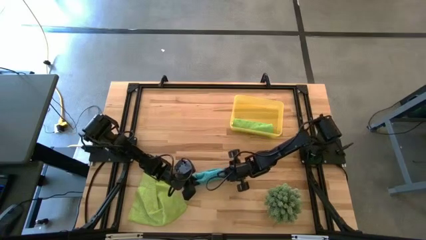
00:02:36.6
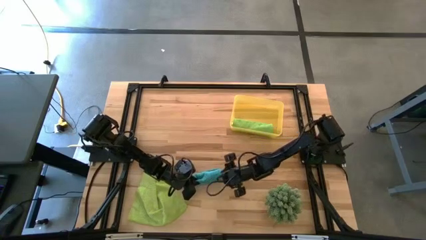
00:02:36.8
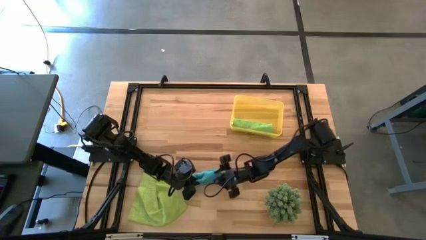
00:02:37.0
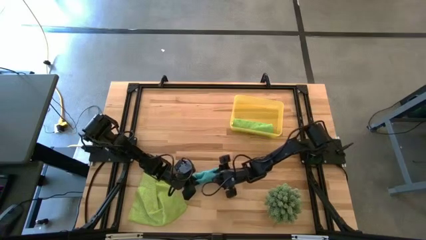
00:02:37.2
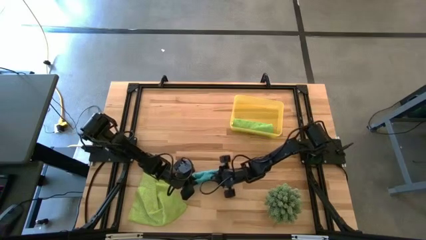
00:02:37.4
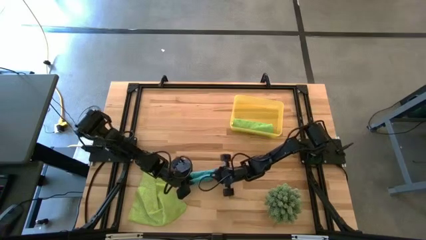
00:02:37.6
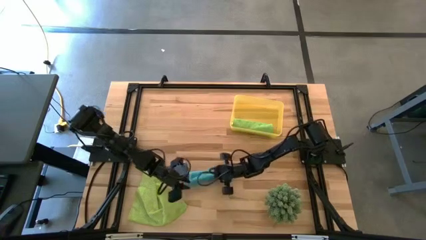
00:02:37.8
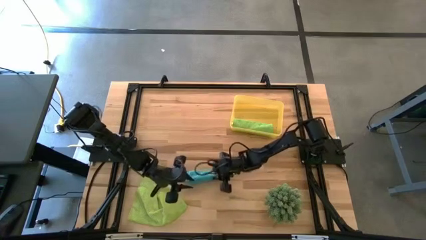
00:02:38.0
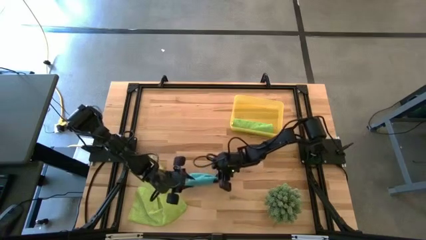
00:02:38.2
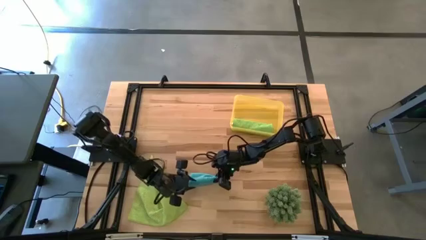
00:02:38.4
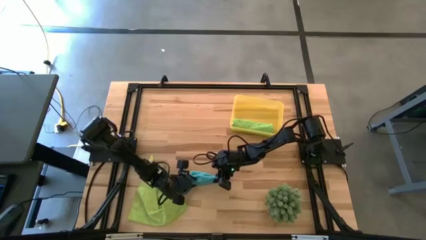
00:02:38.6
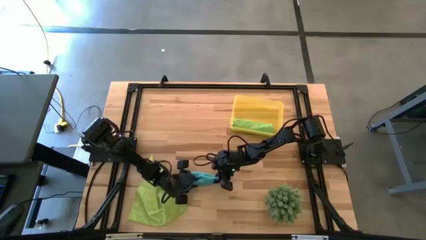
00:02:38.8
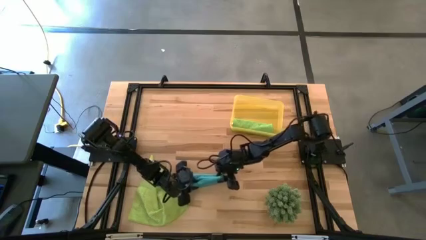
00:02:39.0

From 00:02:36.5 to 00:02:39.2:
Task: Roll microfiber towels into tight, uniform cylinder then place into a basket
Roll the blue microfiber towel

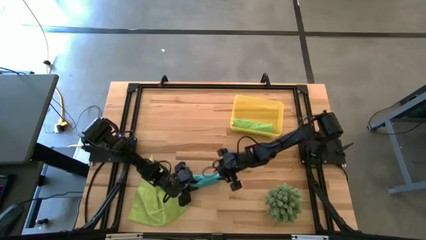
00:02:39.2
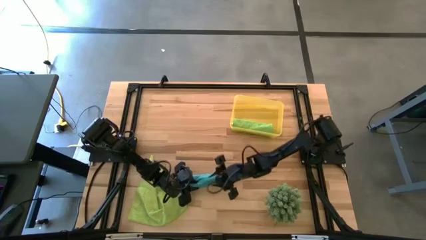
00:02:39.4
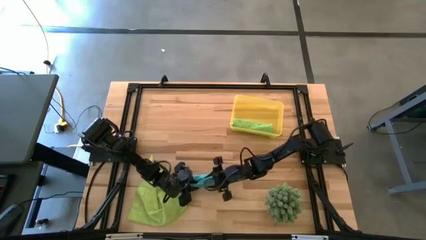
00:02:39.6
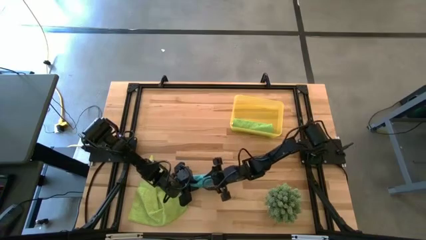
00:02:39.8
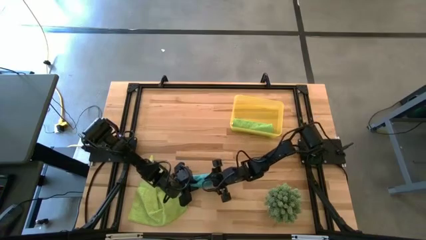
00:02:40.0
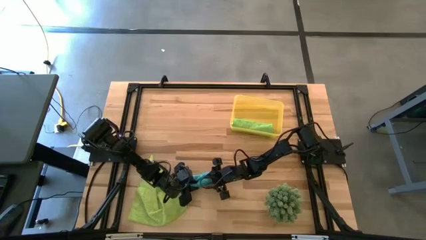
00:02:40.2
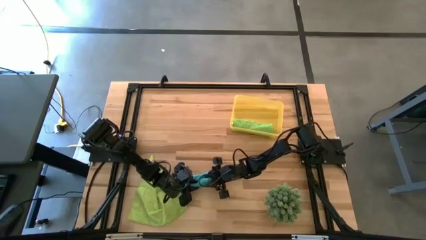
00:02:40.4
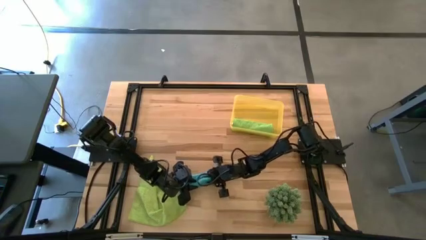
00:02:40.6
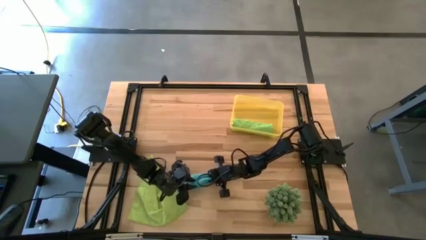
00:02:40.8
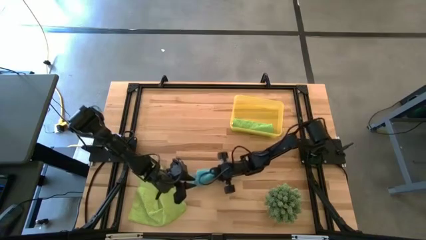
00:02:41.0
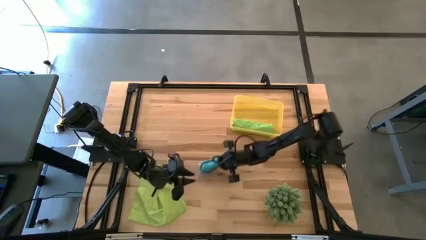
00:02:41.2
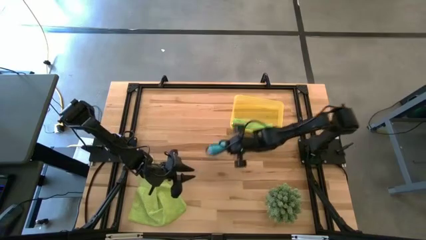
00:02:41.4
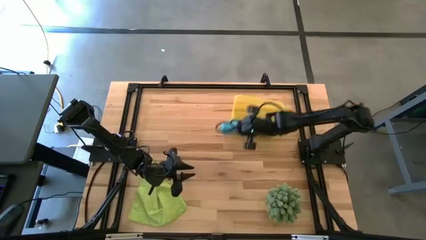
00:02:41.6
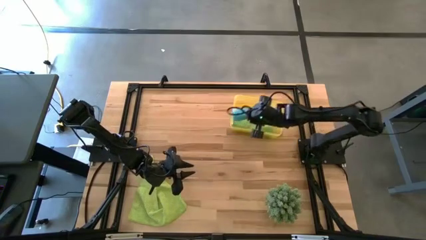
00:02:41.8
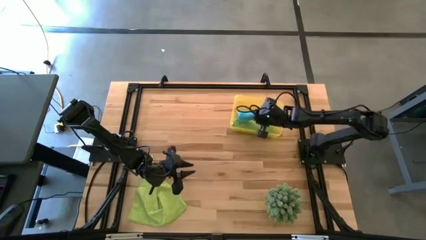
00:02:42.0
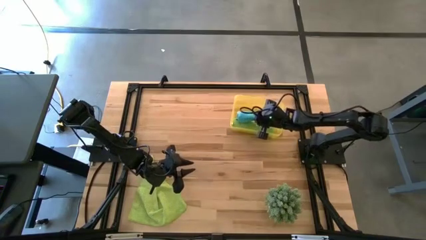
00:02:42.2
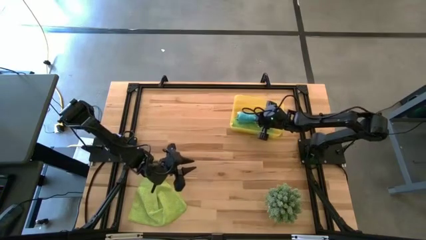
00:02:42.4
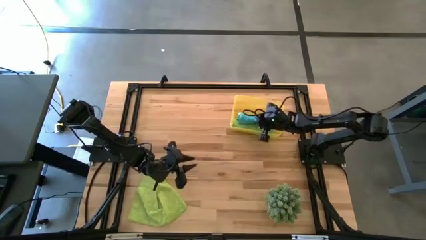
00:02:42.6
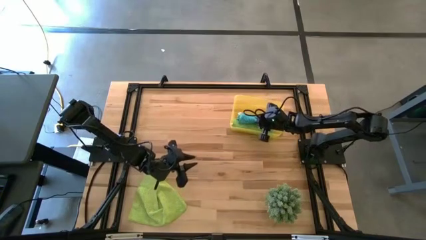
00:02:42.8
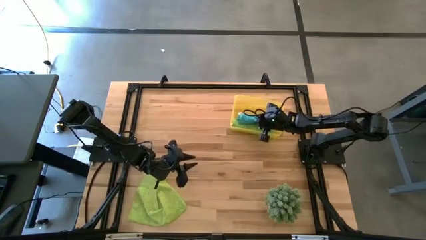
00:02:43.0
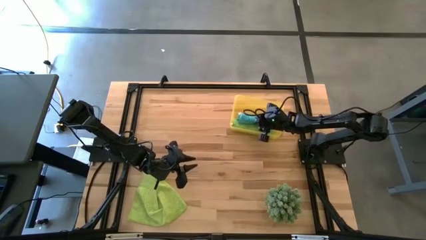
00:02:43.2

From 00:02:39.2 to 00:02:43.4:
Put the rolled blue microfiber towel into the yellow bin

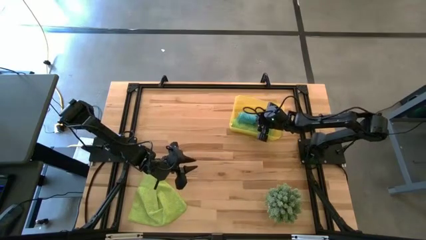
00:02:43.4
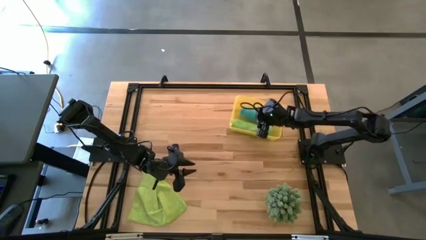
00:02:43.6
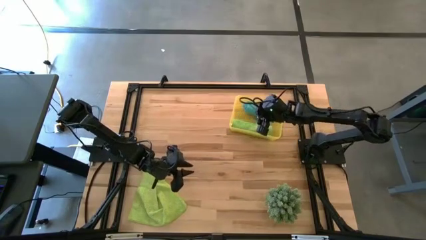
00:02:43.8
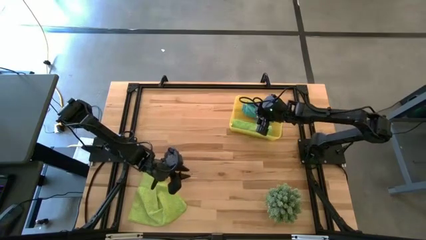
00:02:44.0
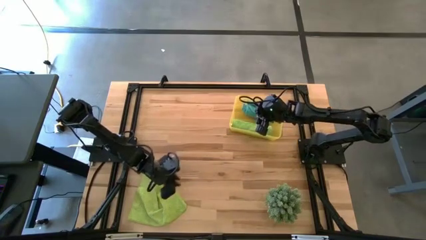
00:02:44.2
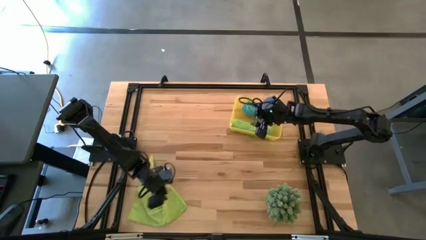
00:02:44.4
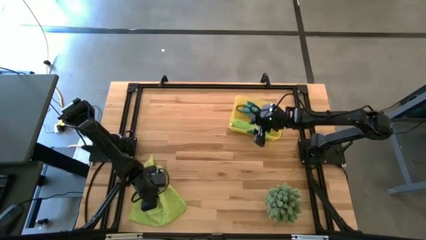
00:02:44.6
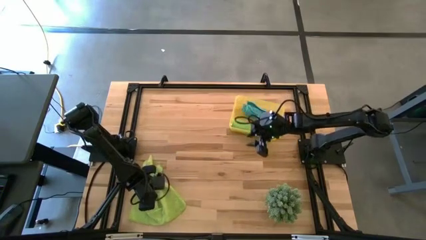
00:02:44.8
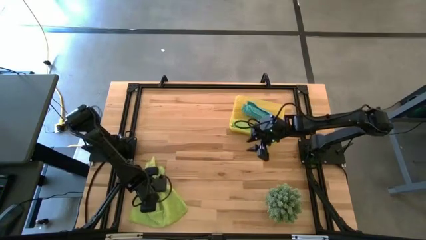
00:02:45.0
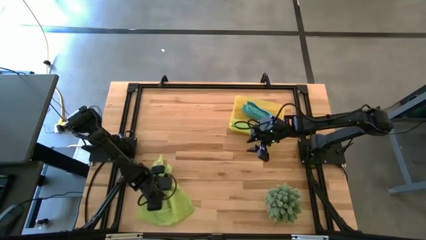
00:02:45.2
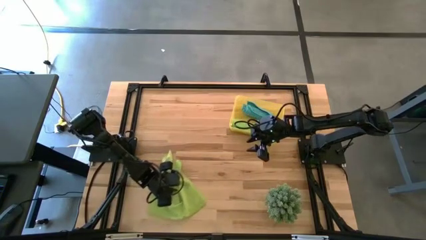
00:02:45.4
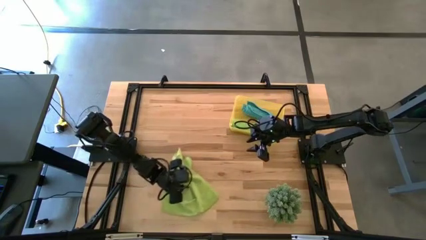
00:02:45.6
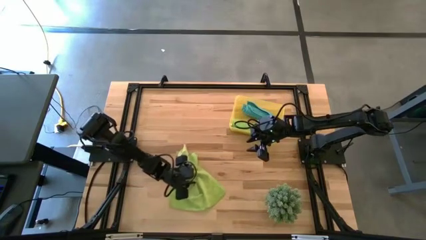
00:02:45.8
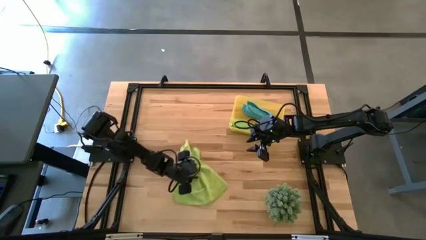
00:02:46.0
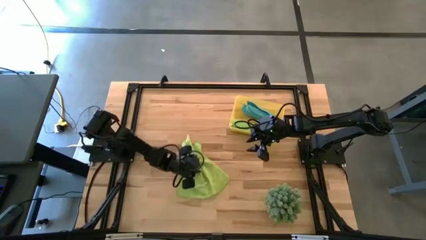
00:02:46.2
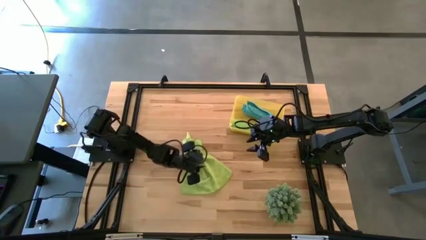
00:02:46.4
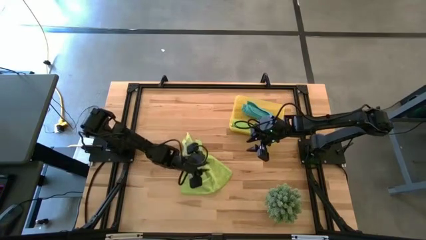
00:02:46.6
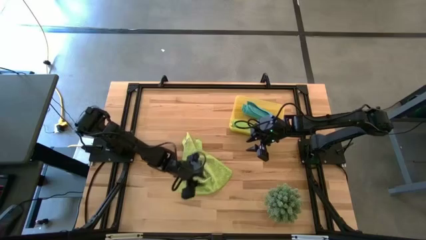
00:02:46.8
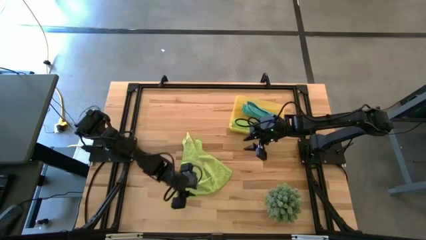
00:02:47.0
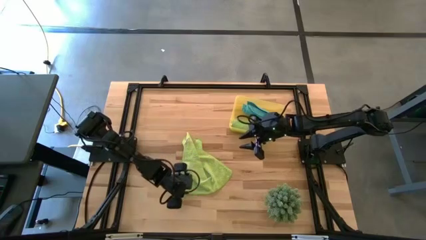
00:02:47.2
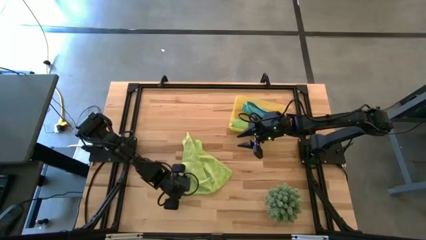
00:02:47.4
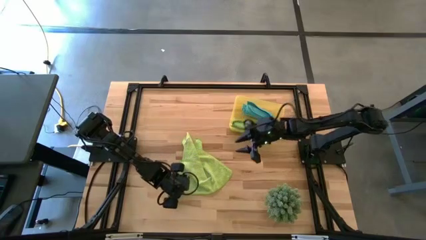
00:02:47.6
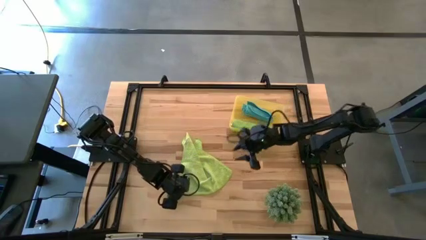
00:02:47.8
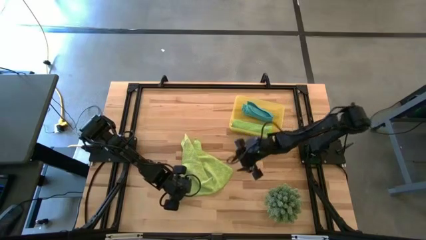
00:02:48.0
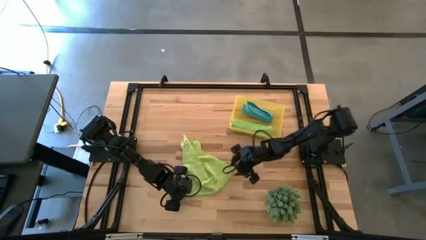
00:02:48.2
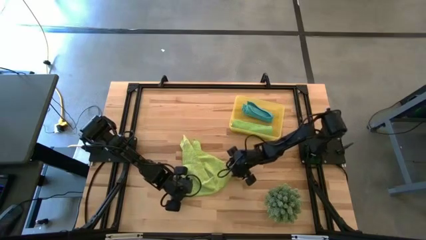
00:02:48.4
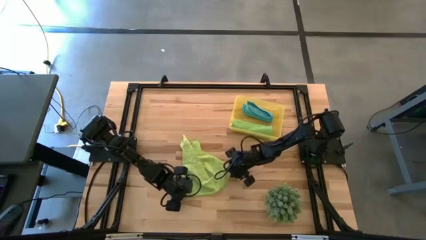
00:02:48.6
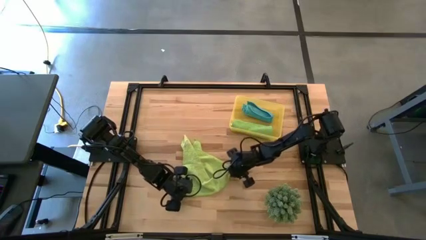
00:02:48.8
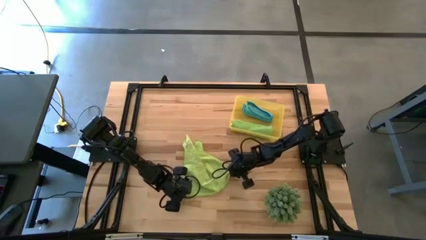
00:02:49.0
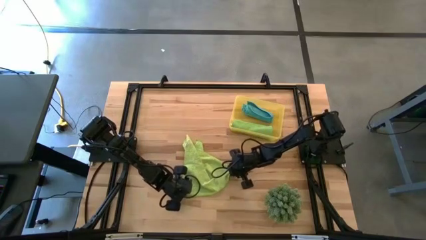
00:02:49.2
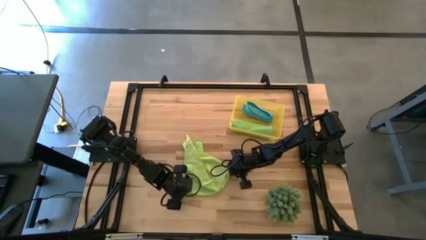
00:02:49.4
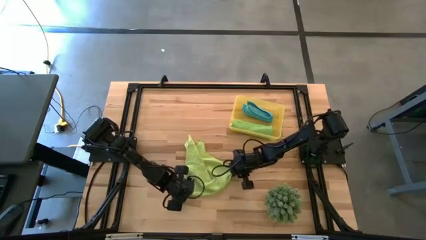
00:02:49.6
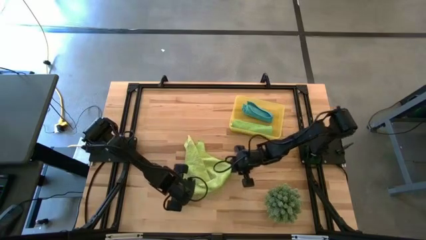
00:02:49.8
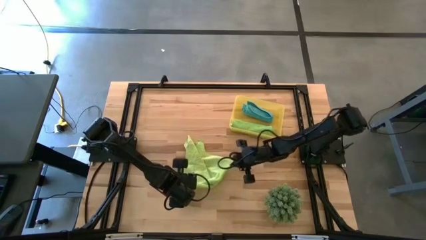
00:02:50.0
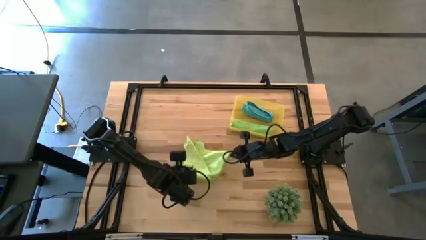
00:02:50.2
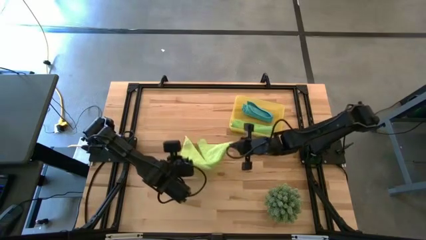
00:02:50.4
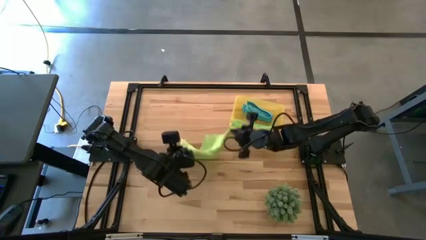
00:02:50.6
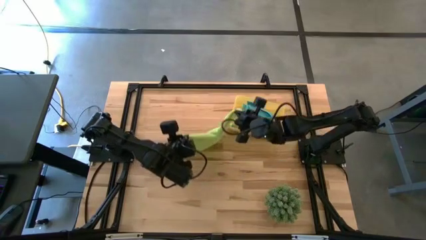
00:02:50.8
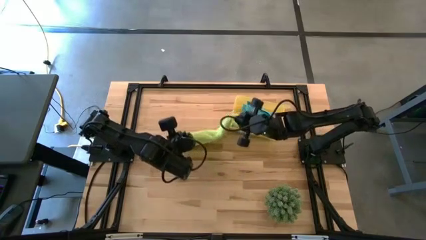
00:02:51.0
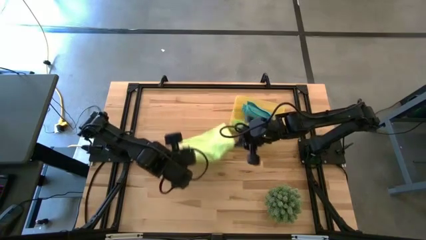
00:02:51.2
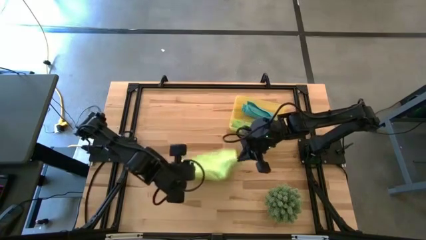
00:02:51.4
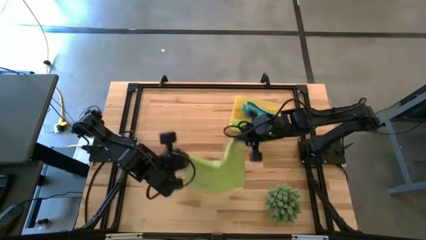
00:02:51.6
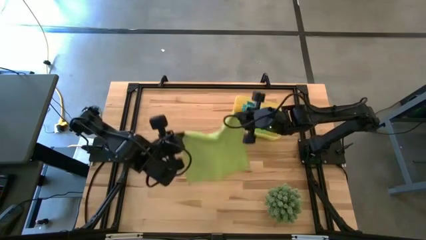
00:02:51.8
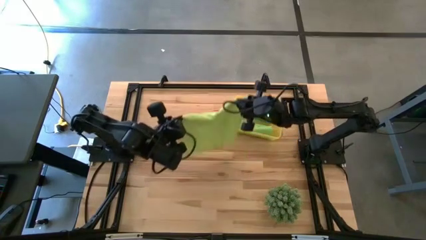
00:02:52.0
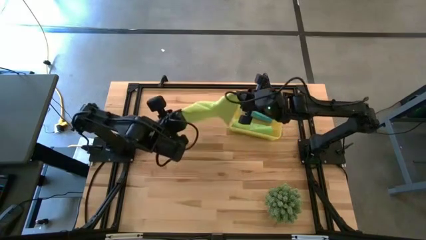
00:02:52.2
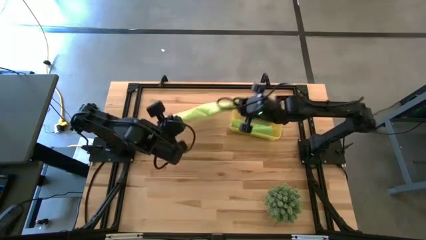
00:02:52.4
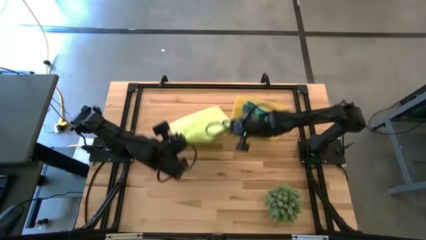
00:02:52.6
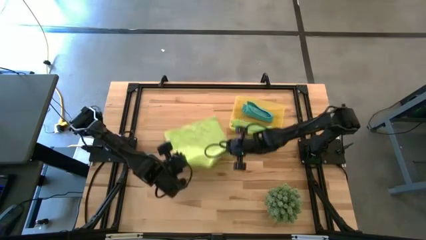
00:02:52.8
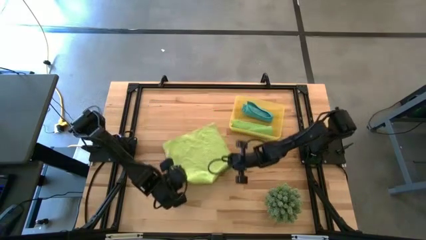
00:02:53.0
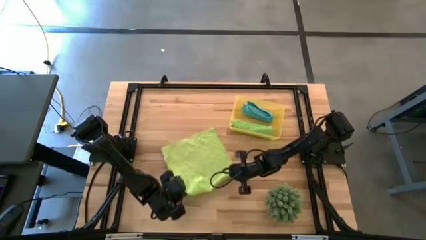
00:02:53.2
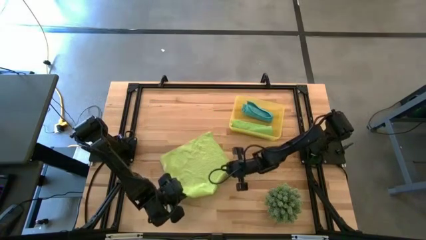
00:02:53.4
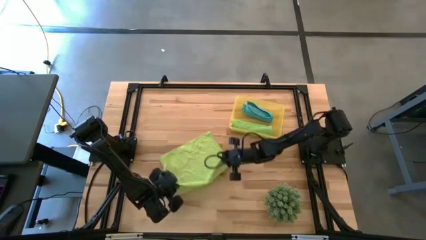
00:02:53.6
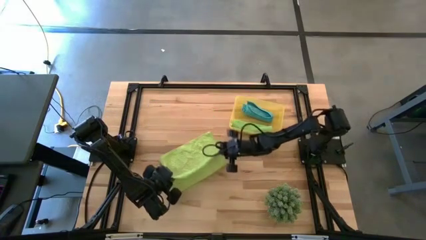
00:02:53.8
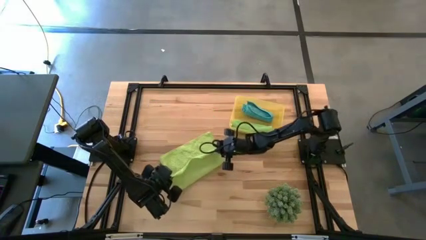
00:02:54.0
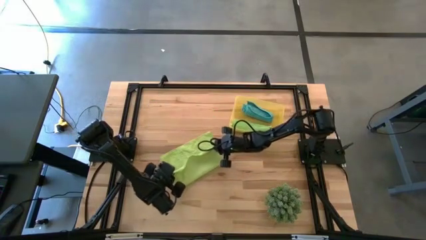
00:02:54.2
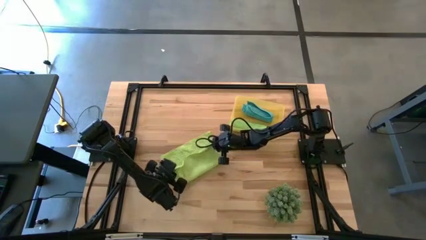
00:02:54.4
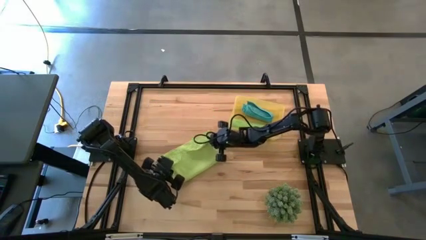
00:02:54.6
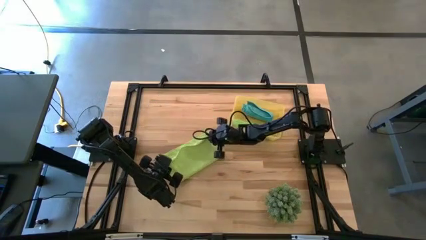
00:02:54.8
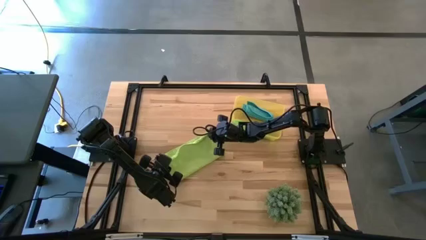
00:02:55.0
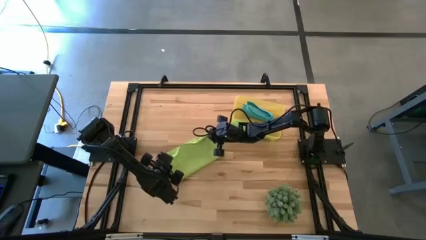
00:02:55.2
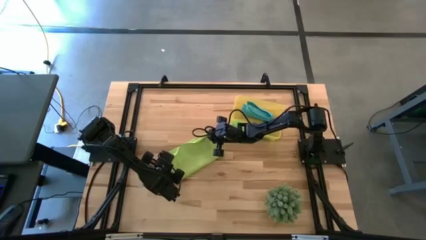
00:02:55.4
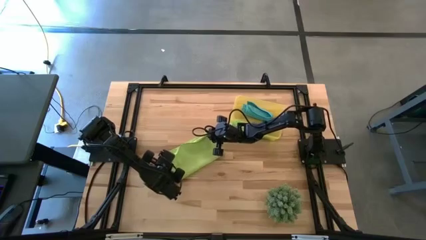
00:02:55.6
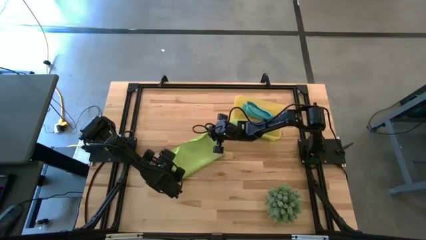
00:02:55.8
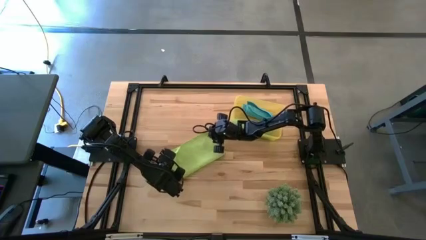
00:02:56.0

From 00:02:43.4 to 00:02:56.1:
Fold the green microfiber towel
